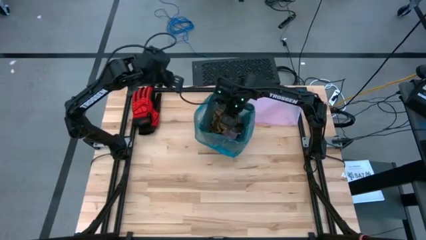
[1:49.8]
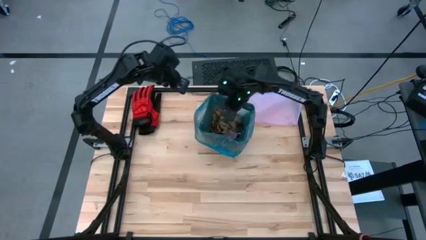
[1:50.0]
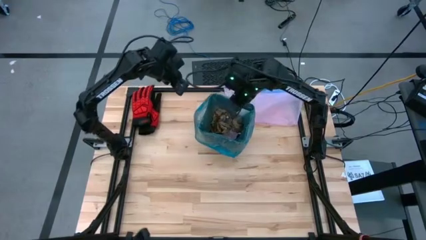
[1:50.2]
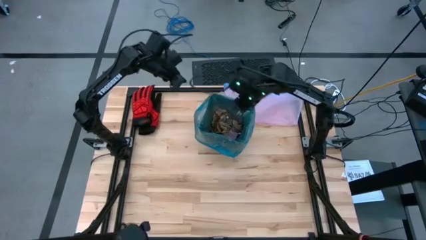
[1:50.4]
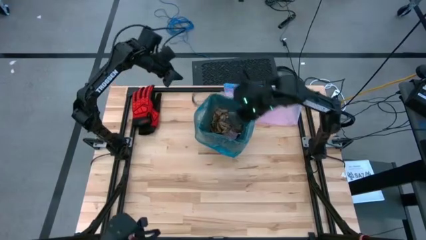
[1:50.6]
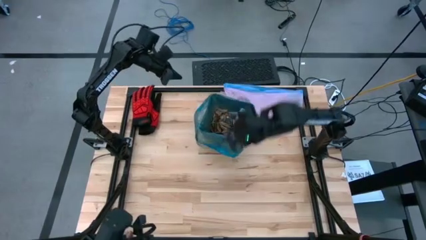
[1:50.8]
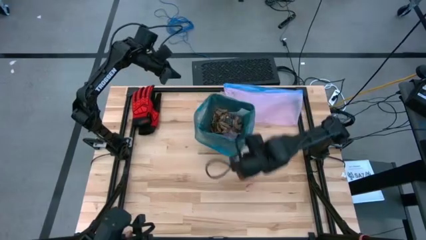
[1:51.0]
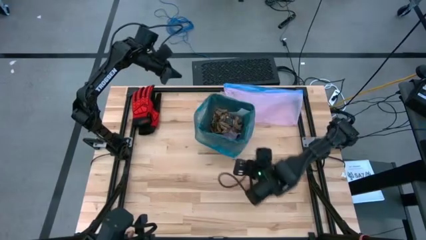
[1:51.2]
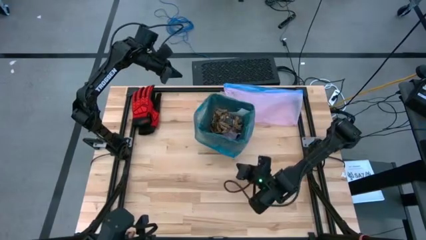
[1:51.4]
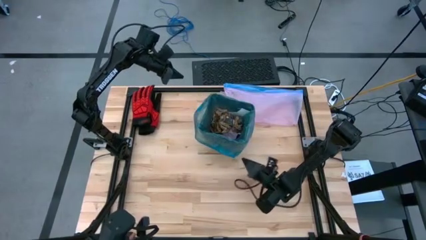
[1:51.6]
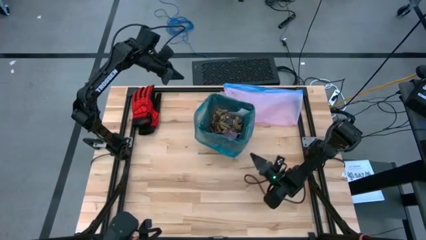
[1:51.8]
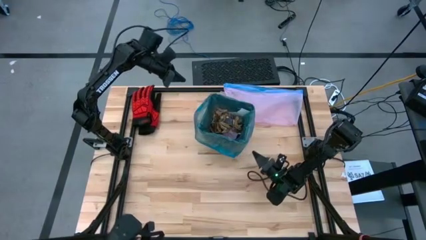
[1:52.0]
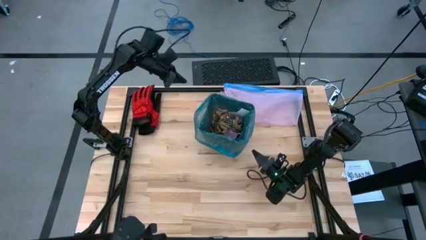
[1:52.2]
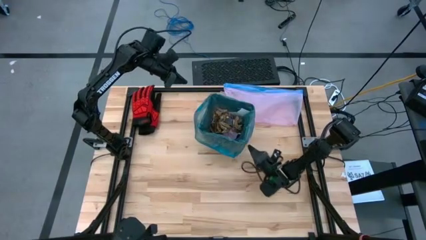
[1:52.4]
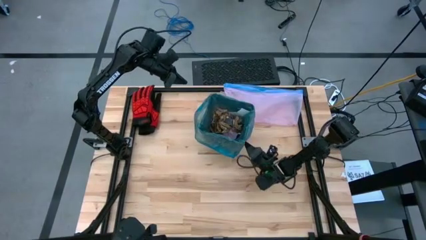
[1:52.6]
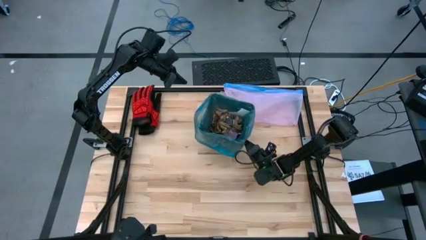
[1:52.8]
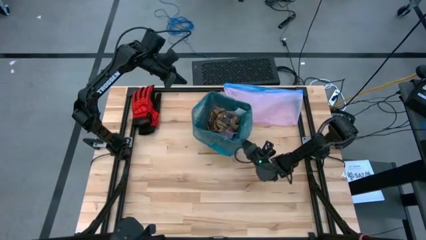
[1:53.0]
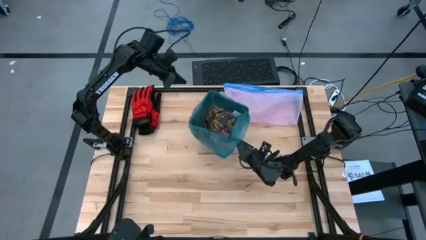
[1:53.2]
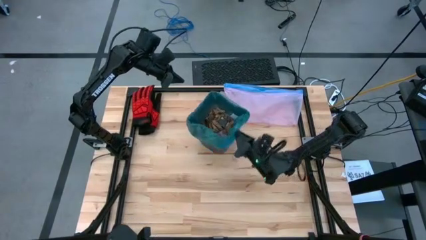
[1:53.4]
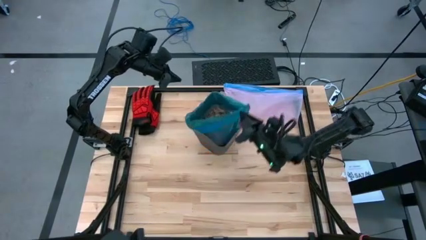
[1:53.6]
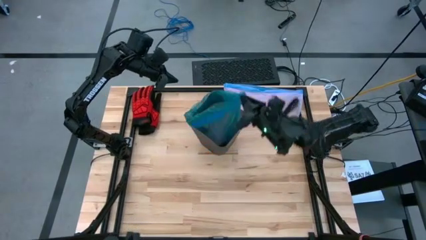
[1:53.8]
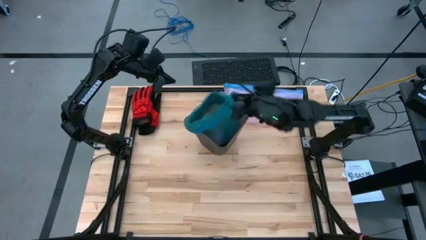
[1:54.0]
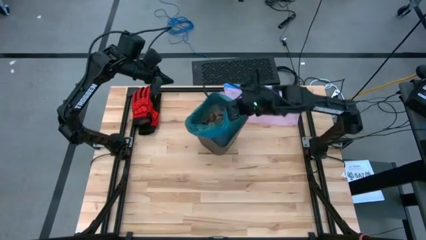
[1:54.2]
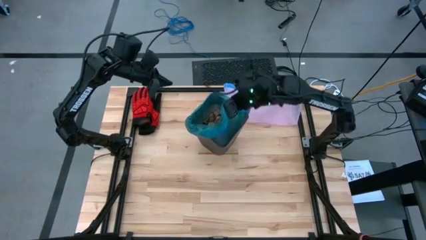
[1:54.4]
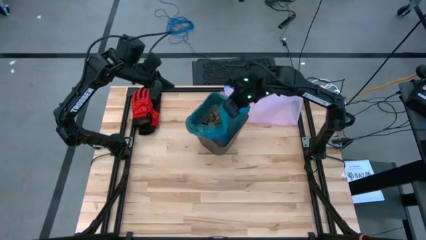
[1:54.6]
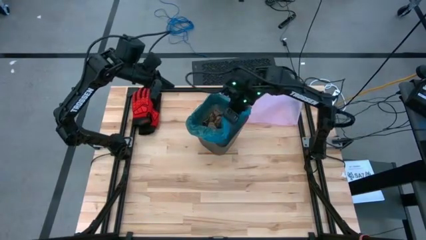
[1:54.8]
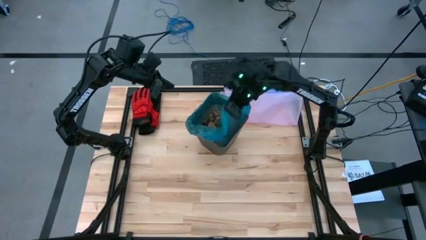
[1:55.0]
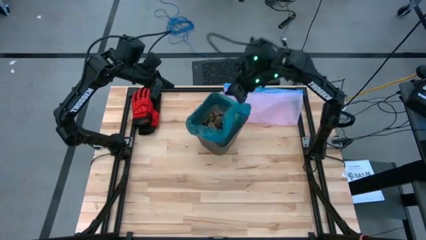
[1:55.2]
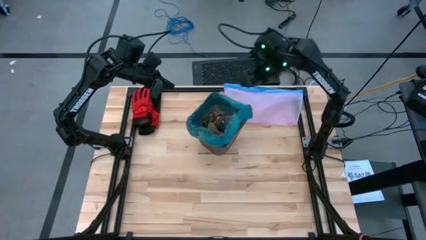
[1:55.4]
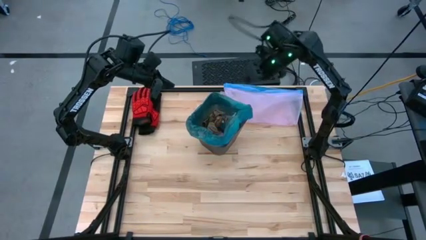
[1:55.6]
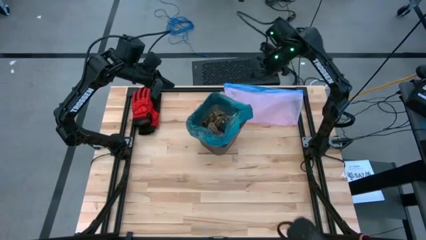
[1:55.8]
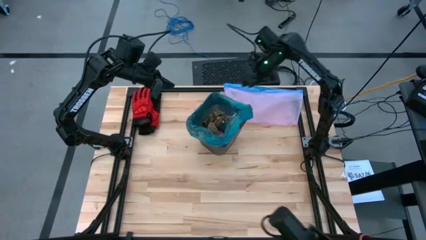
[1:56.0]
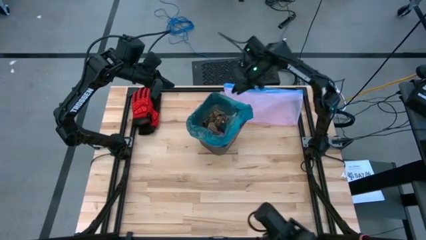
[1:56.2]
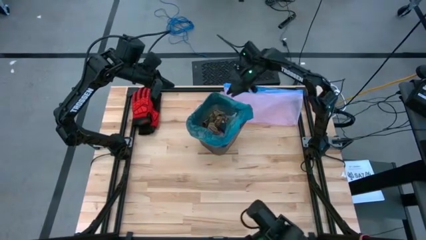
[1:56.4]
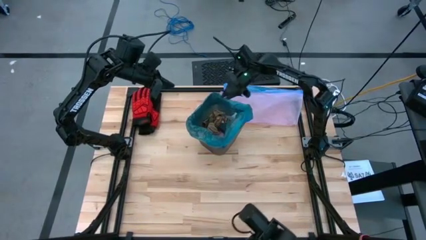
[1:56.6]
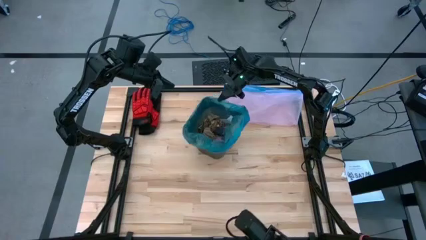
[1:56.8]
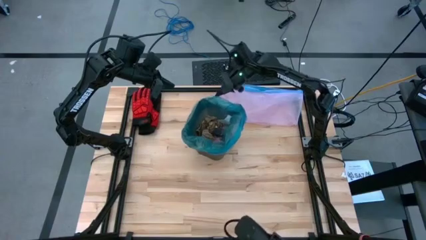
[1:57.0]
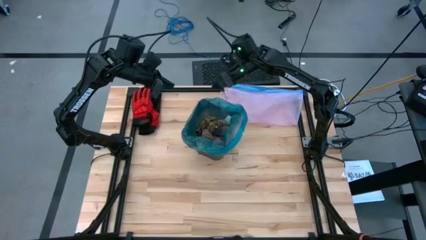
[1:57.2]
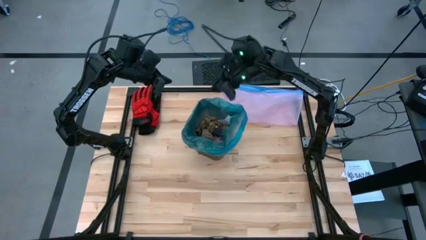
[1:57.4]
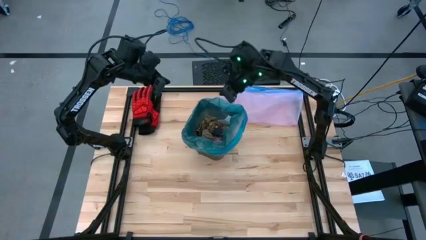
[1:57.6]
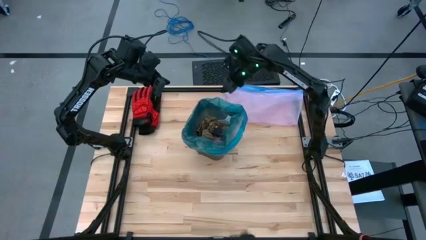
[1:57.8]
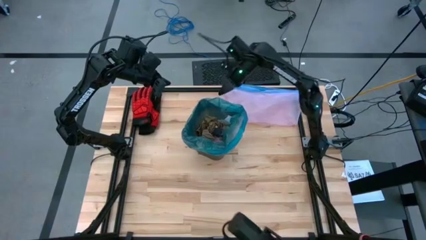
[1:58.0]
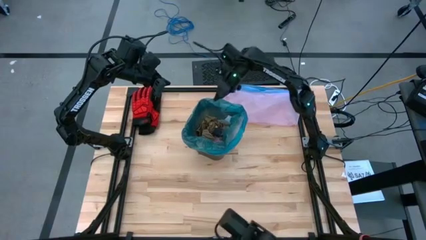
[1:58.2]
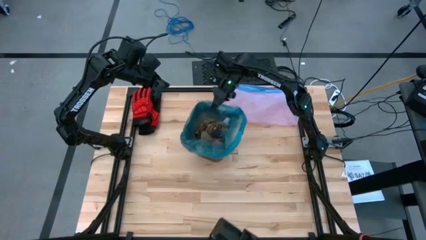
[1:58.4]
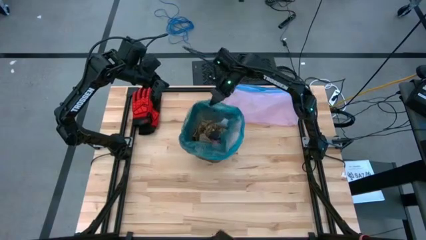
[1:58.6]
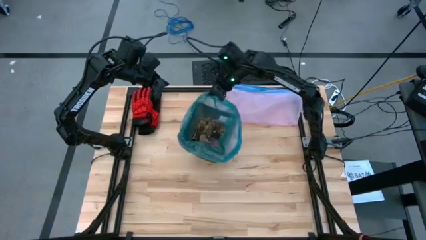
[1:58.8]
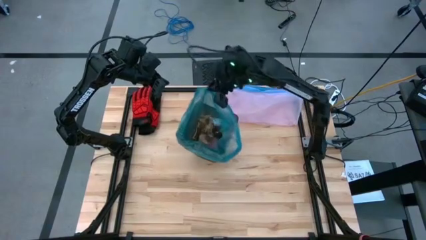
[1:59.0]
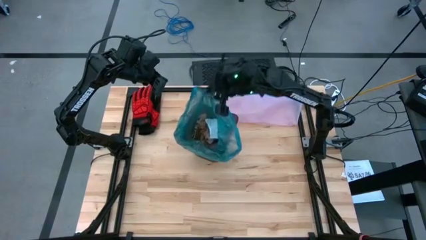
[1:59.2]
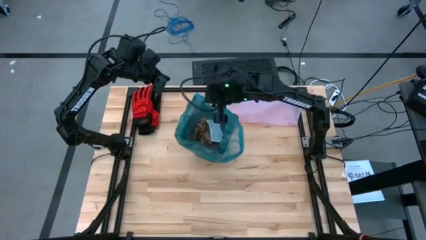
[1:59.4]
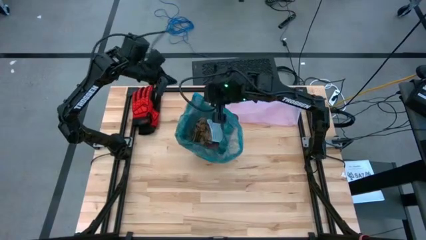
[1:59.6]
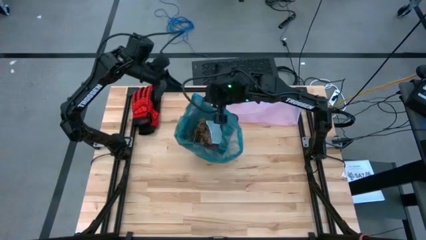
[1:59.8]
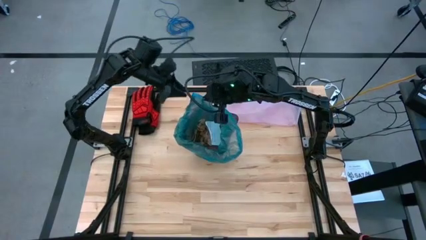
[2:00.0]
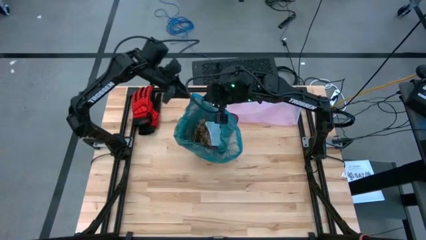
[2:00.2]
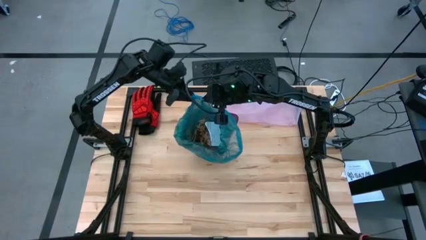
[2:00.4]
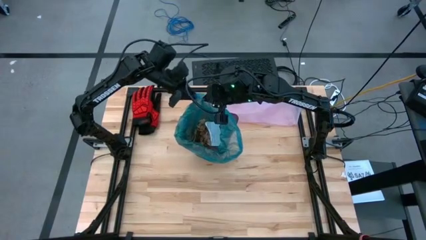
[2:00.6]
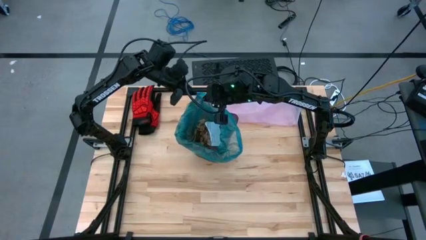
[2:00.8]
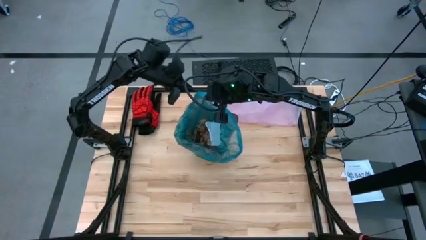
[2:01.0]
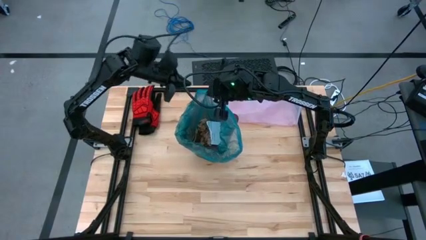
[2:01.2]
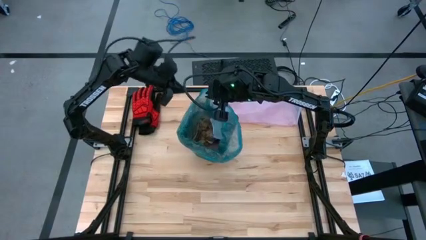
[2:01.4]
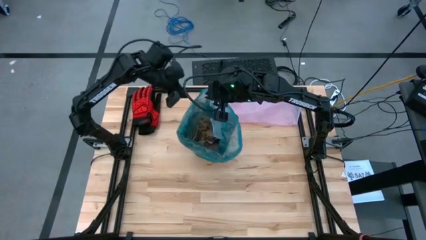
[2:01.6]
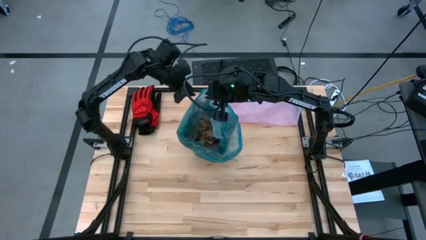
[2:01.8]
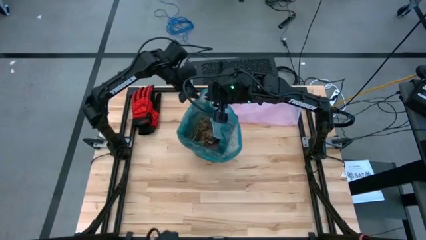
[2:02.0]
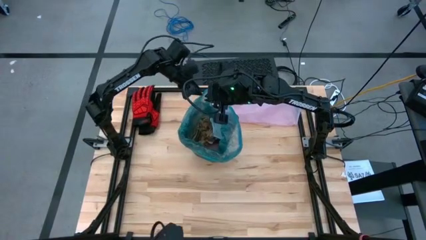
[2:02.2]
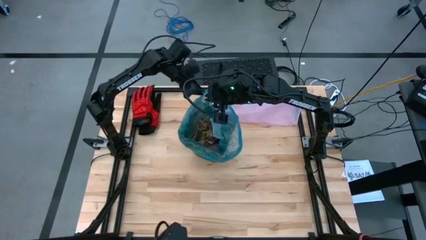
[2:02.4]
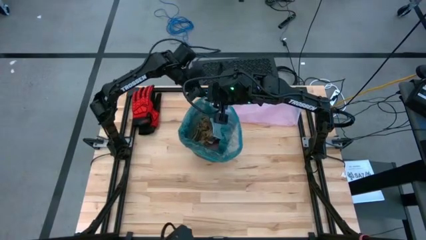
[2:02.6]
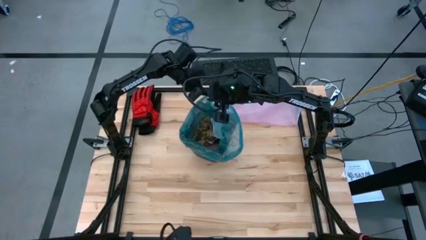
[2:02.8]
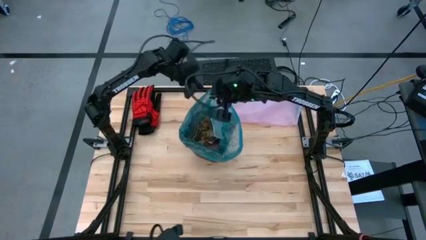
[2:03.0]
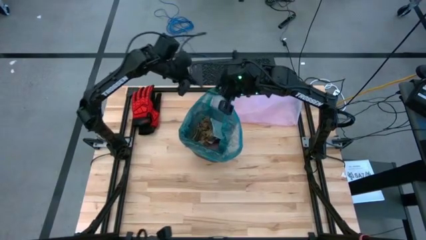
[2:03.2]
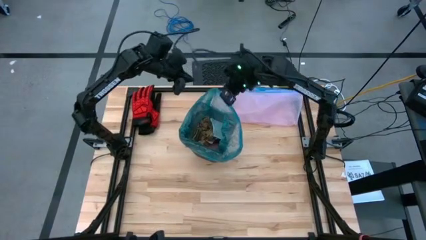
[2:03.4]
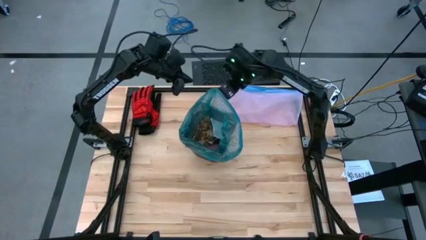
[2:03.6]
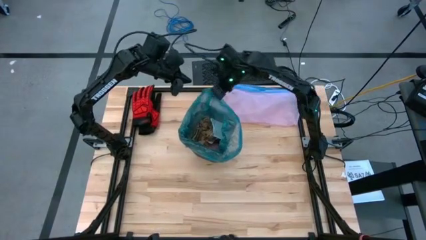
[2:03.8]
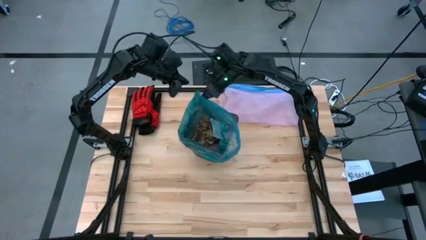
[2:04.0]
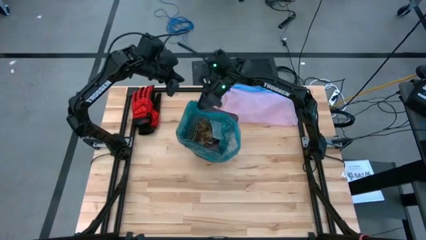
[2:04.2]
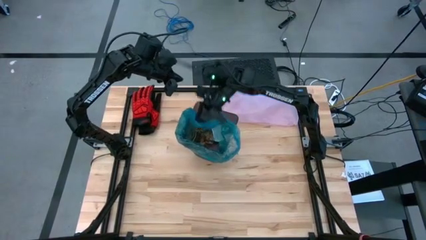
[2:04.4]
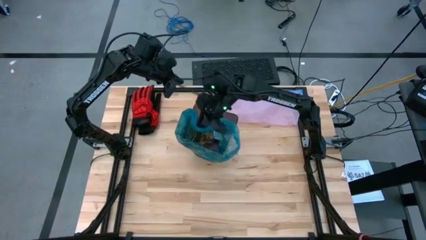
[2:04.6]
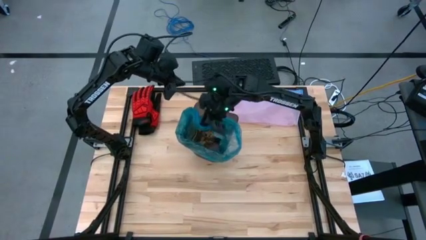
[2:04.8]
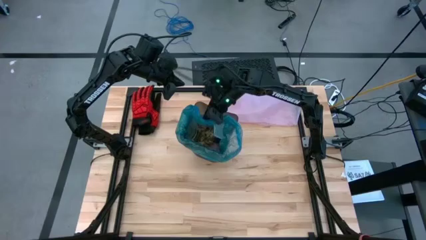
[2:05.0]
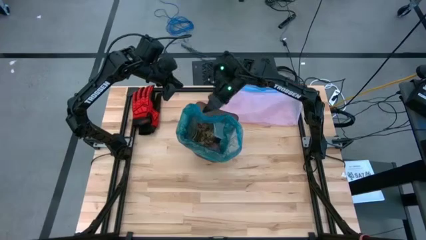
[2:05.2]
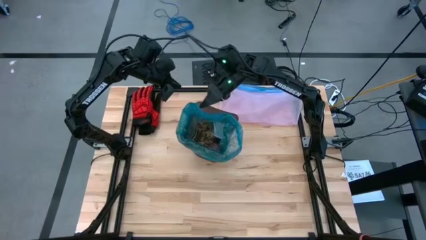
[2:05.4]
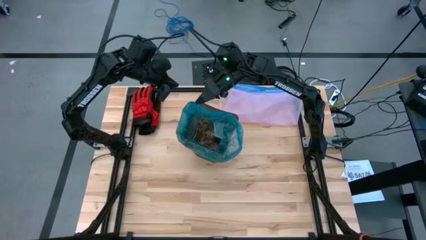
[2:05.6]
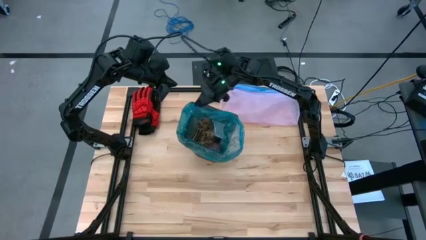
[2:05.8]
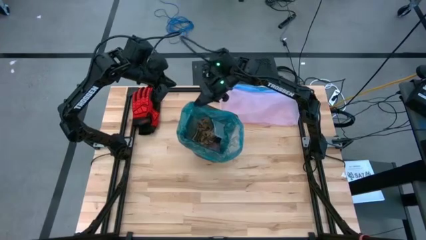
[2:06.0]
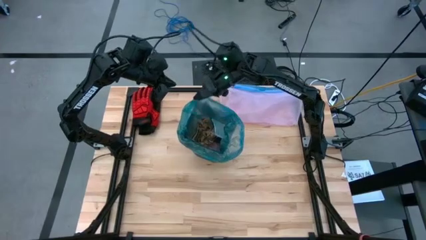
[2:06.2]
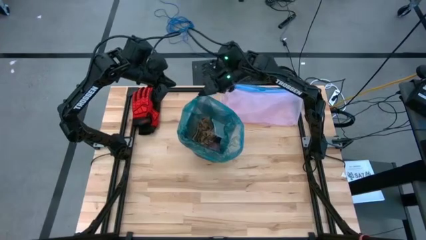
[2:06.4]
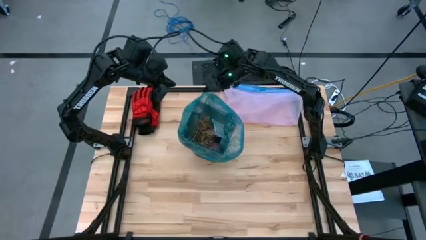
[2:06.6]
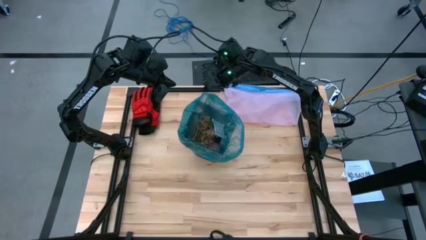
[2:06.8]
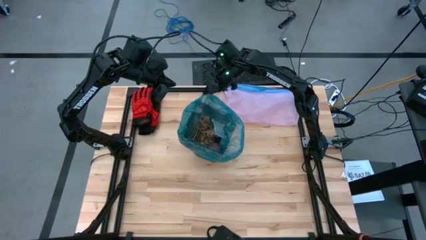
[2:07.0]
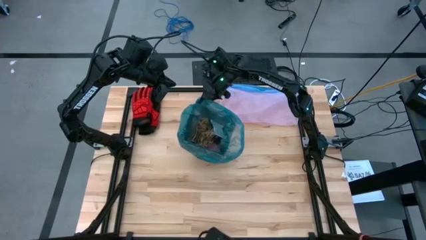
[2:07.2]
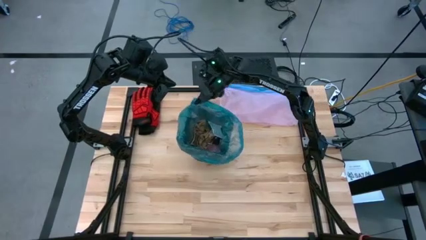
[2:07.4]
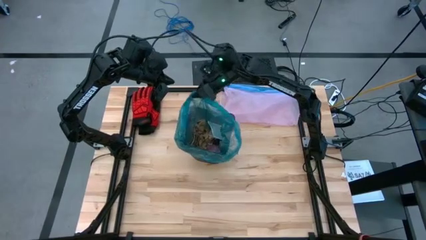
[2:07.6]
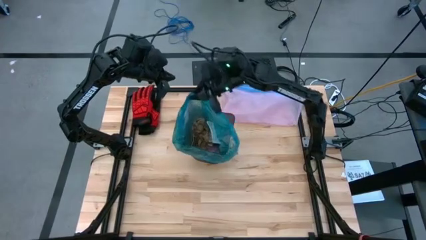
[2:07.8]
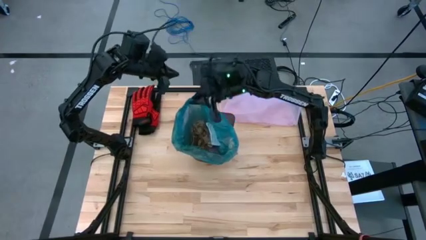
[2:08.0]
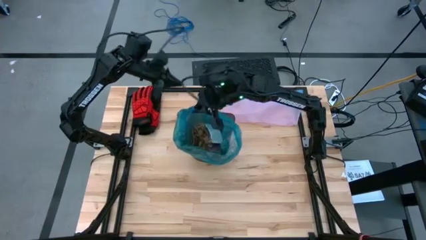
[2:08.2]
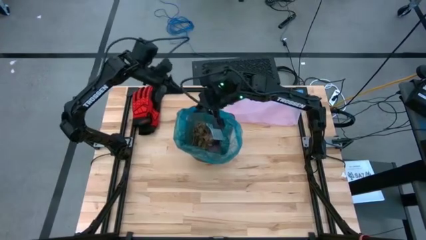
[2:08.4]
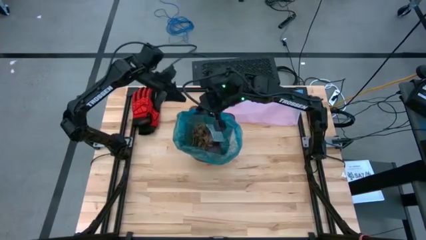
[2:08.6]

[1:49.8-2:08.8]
Task: place trash/remove bag and relplace
Remove the blue trash bag from the black trash bin
